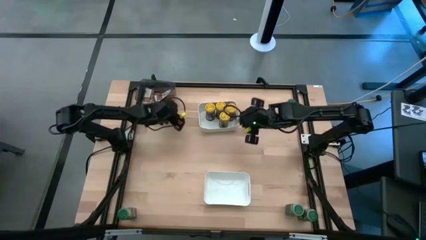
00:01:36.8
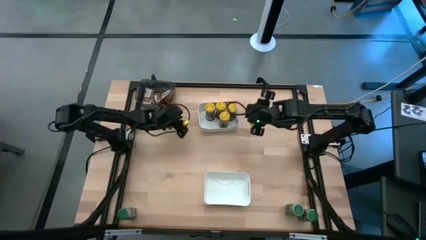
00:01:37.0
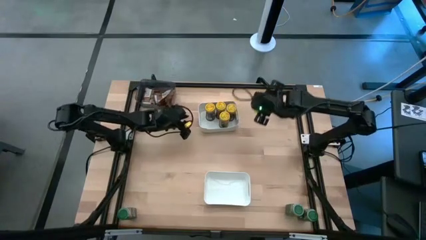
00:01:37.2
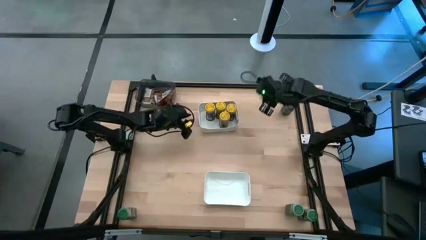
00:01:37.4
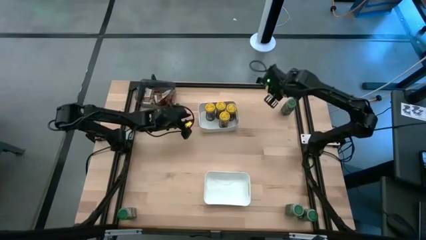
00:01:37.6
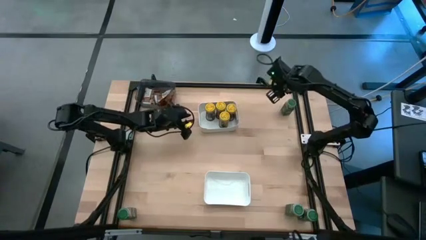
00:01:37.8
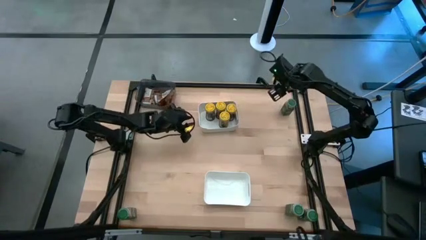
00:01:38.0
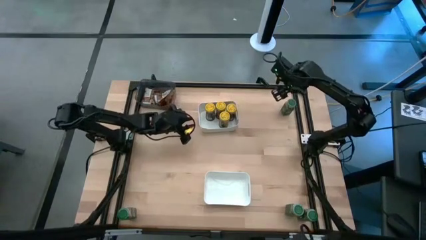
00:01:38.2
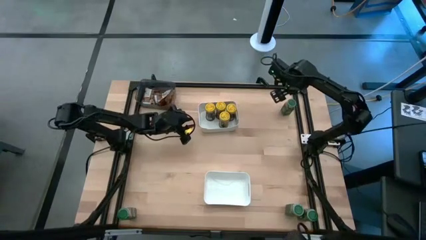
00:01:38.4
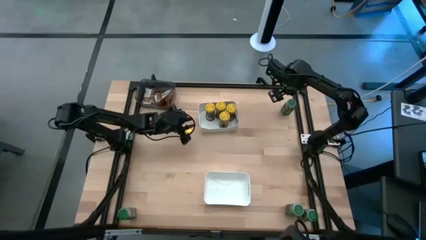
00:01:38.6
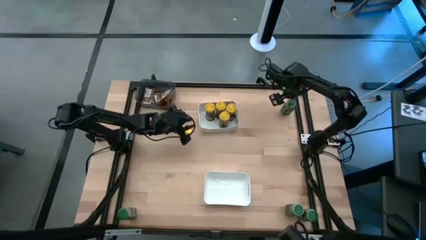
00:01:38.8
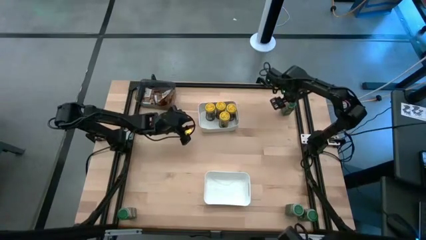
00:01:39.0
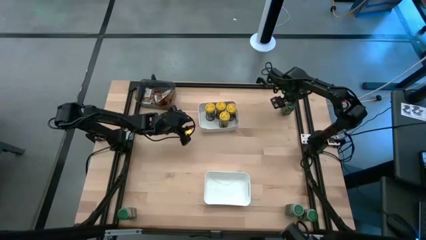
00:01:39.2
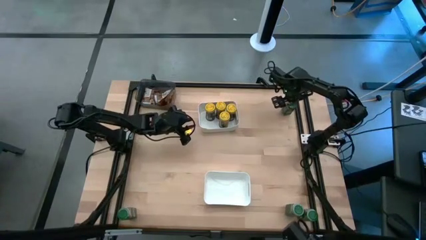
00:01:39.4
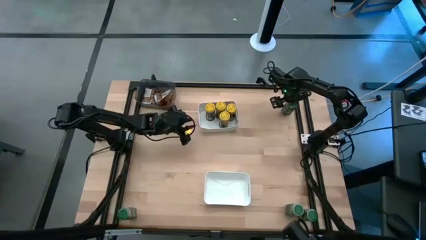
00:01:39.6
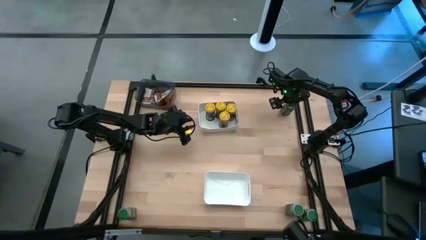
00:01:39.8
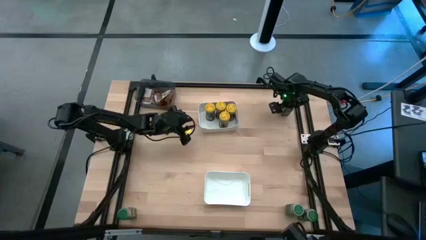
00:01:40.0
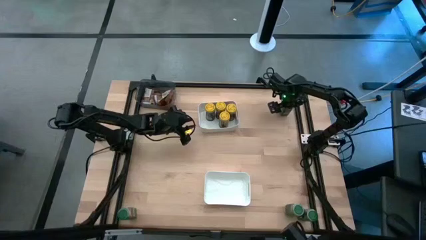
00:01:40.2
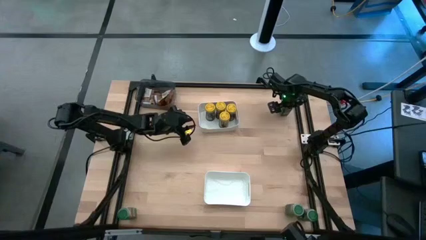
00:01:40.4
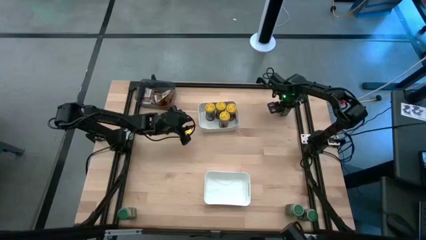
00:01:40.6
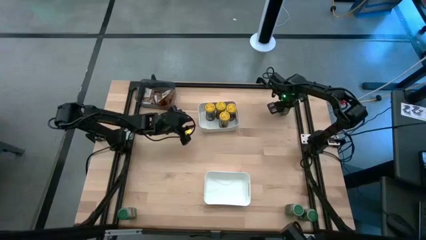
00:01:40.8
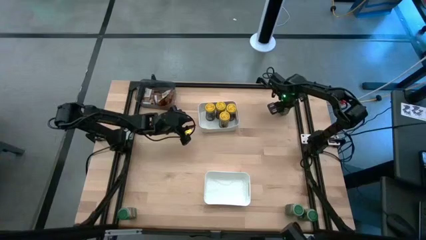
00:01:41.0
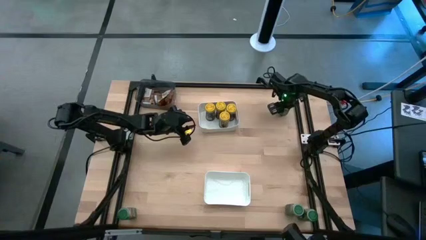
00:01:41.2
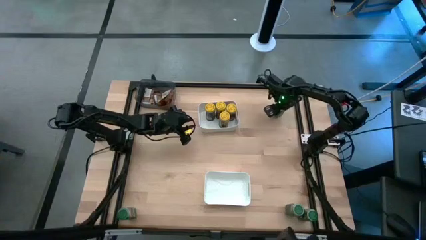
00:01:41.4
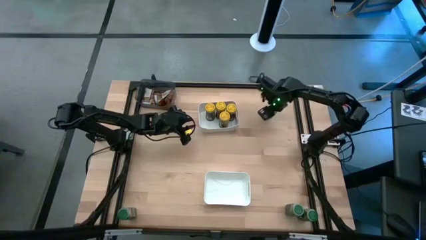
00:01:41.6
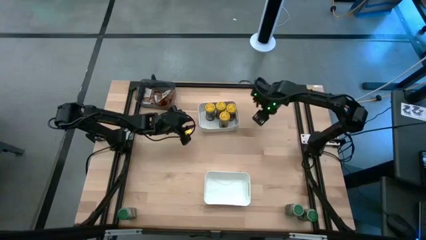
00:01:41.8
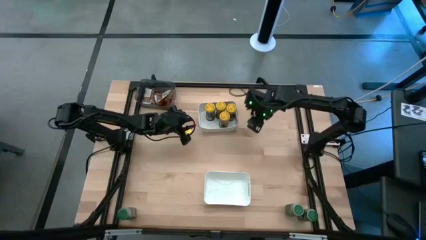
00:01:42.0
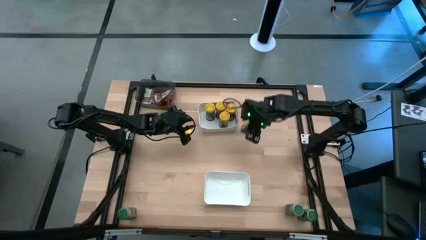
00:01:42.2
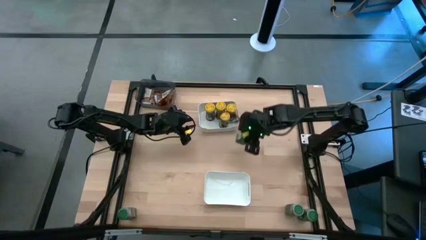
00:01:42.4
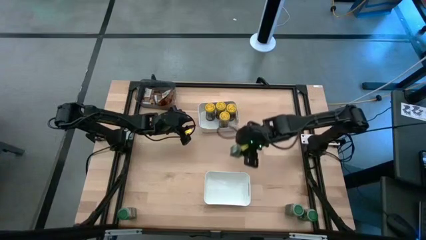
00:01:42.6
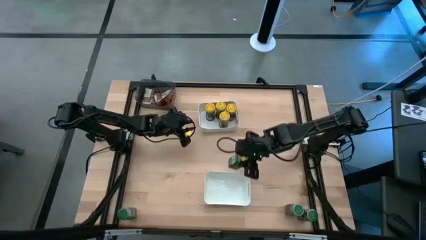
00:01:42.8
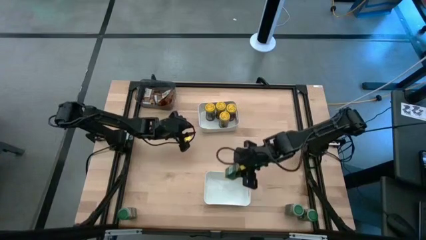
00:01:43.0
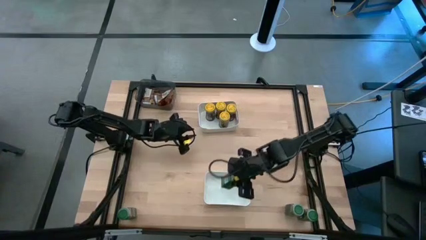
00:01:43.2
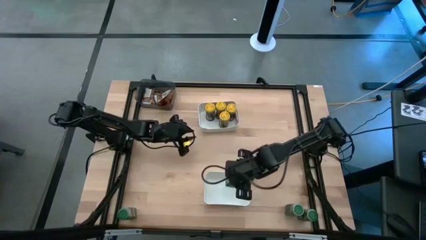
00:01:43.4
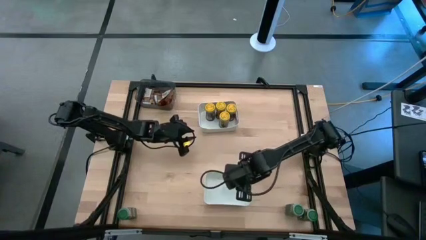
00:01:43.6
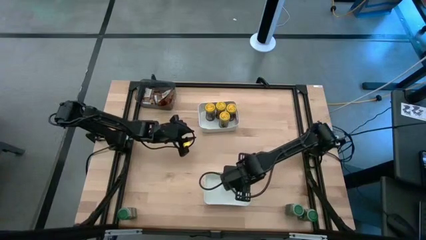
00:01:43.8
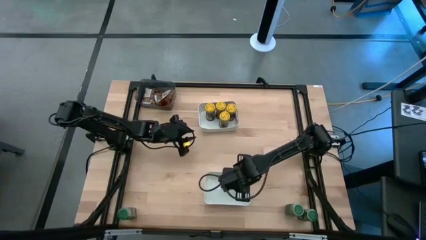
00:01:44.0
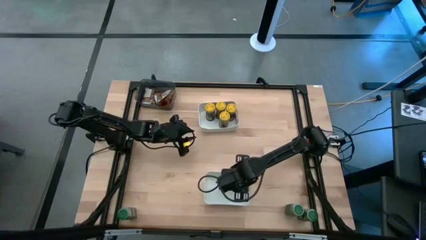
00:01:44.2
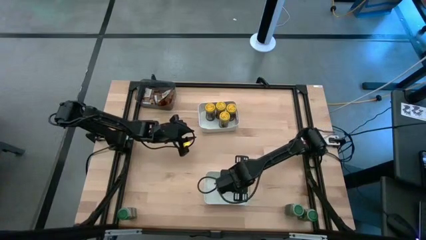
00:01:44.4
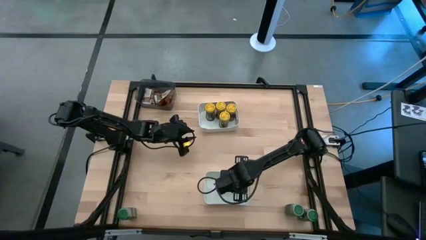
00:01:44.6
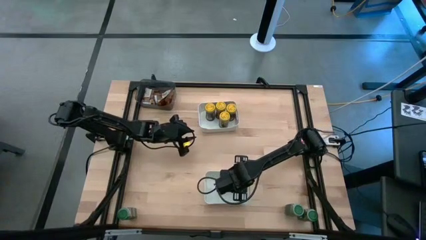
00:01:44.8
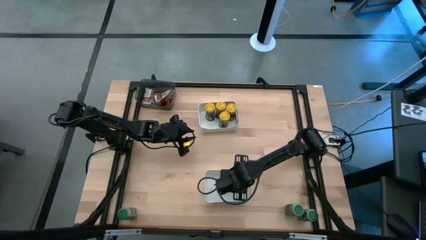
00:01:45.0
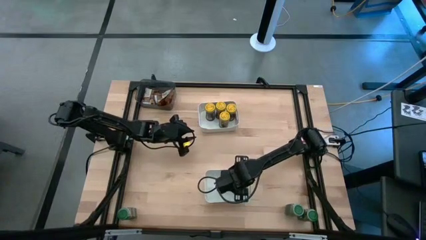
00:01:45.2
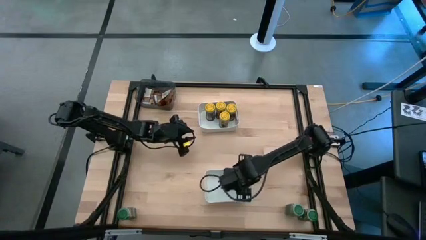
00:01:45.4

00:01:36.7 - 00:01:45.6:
Task: Sort spices by type
Put the green seasoning bottle into the bottom white bin

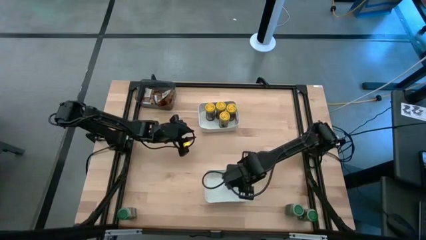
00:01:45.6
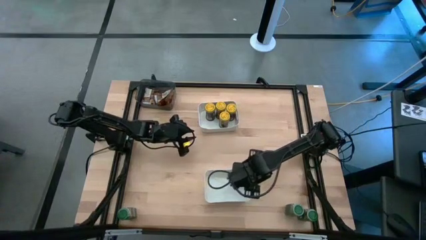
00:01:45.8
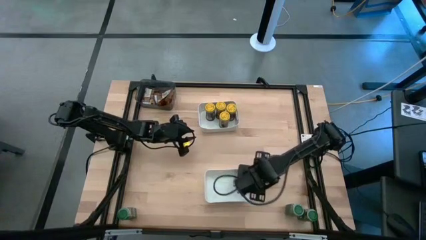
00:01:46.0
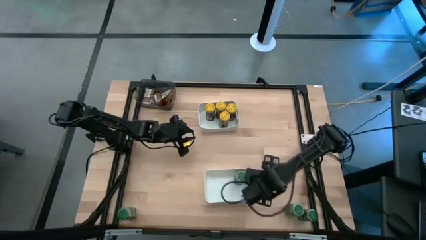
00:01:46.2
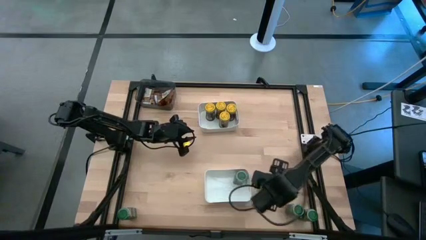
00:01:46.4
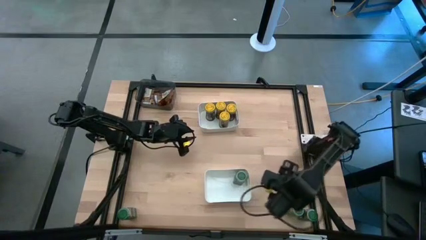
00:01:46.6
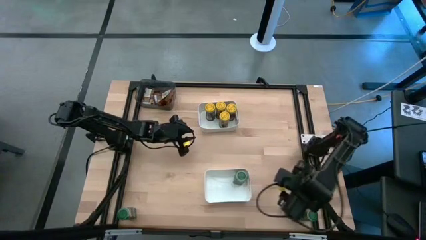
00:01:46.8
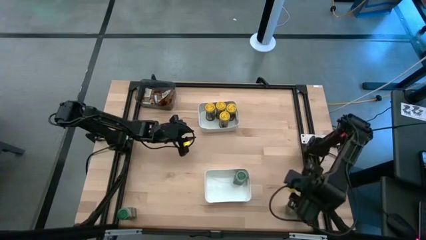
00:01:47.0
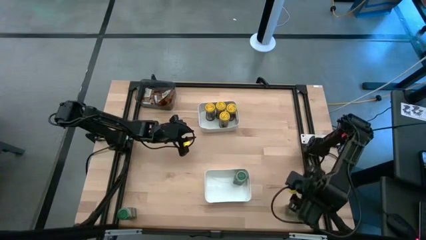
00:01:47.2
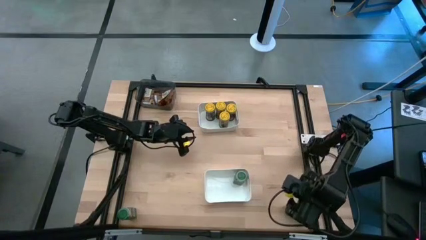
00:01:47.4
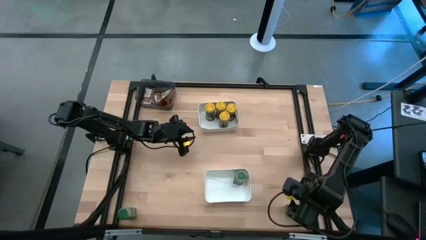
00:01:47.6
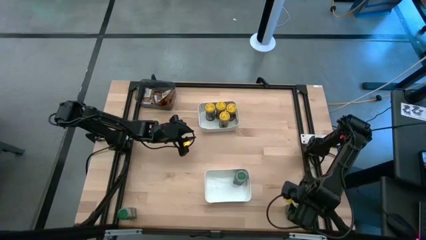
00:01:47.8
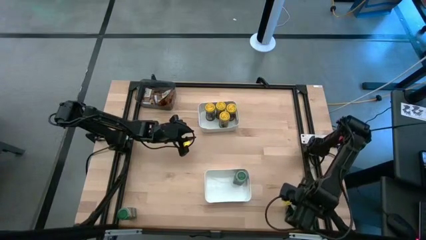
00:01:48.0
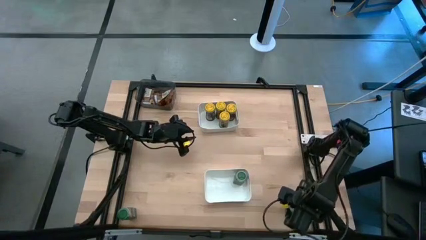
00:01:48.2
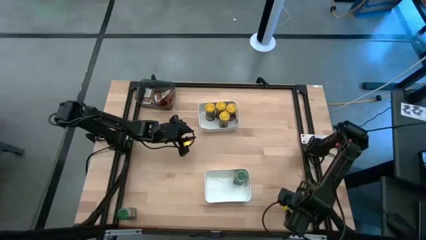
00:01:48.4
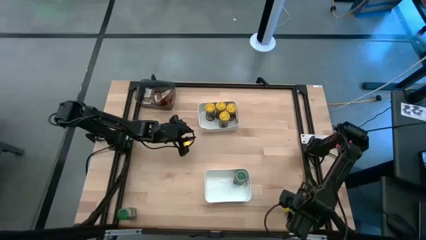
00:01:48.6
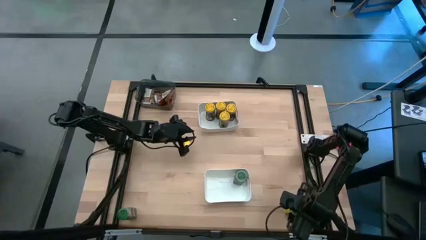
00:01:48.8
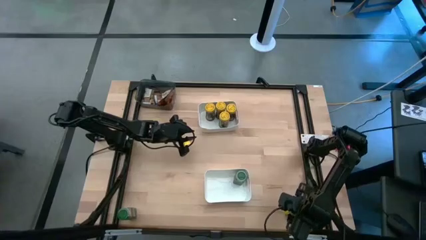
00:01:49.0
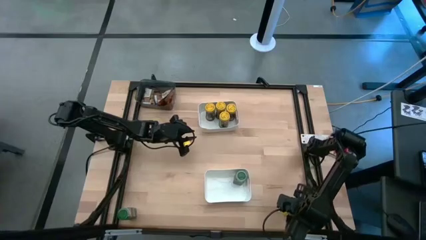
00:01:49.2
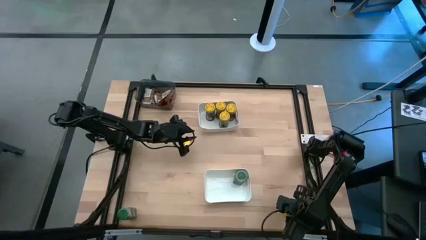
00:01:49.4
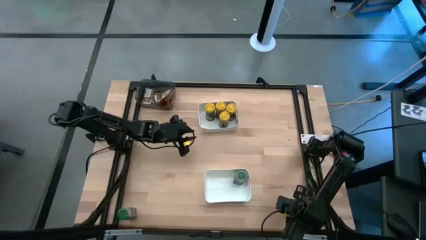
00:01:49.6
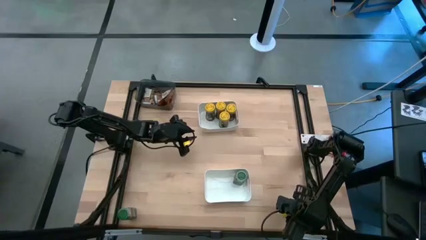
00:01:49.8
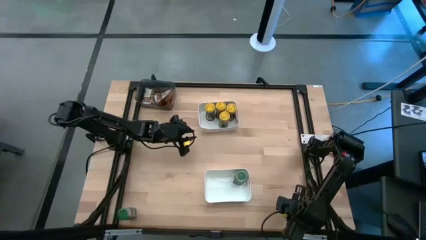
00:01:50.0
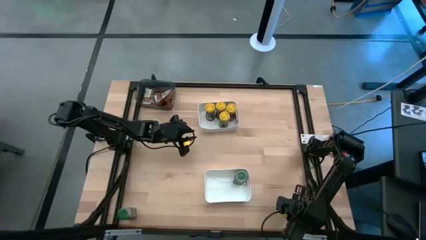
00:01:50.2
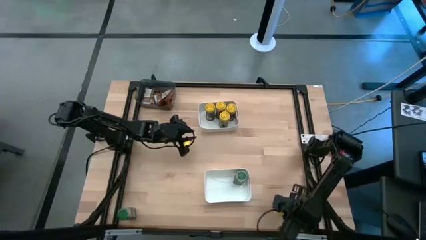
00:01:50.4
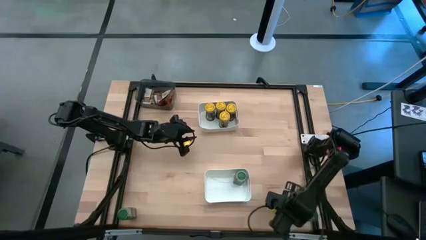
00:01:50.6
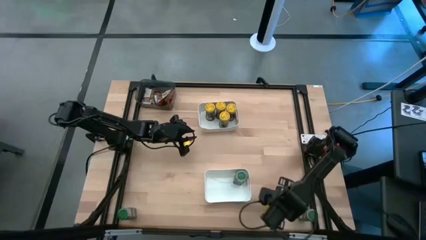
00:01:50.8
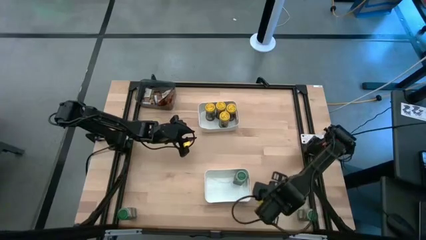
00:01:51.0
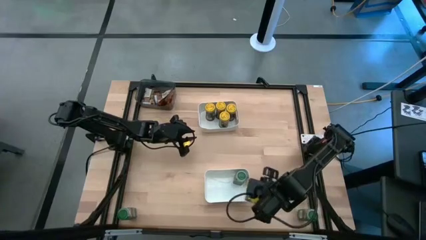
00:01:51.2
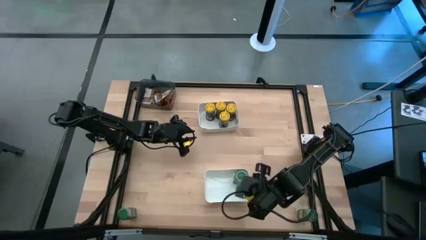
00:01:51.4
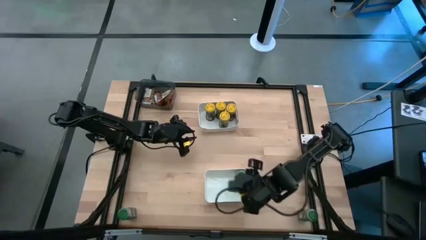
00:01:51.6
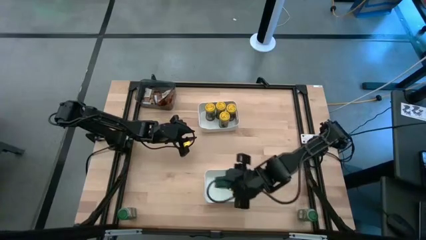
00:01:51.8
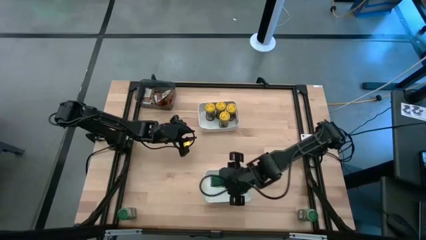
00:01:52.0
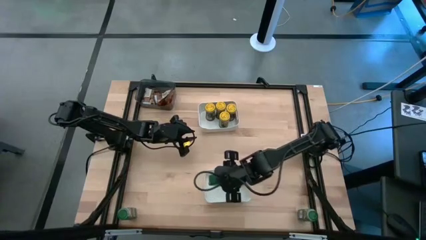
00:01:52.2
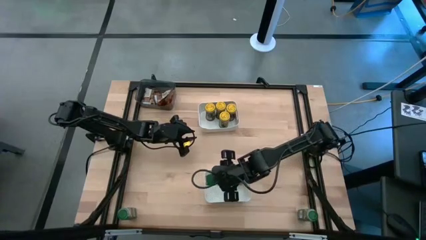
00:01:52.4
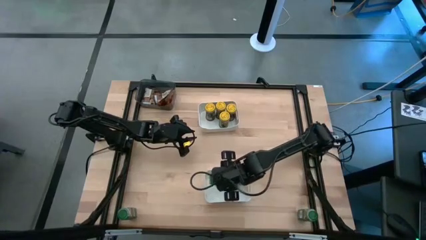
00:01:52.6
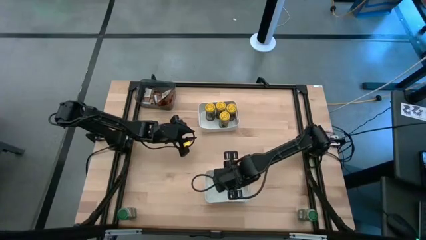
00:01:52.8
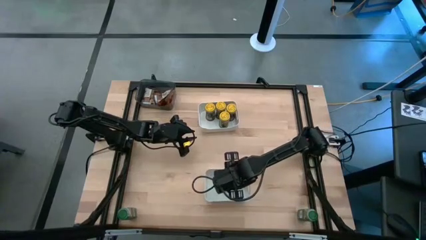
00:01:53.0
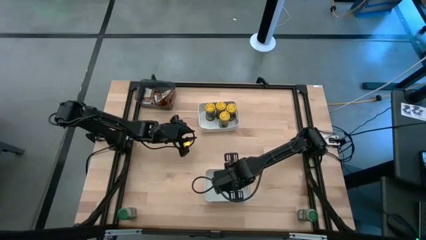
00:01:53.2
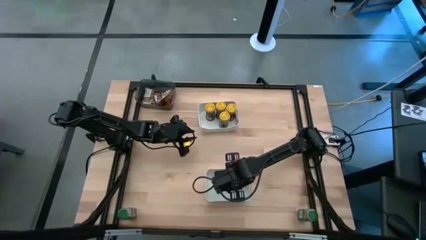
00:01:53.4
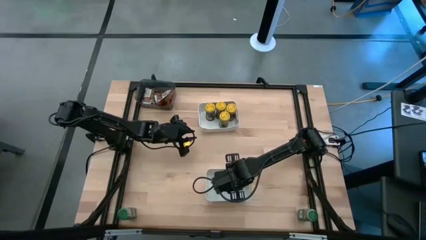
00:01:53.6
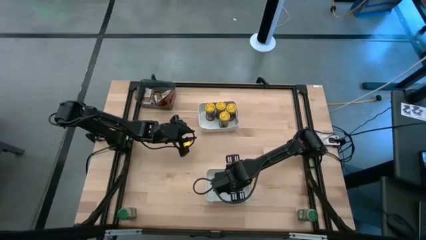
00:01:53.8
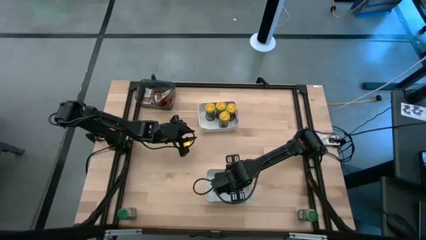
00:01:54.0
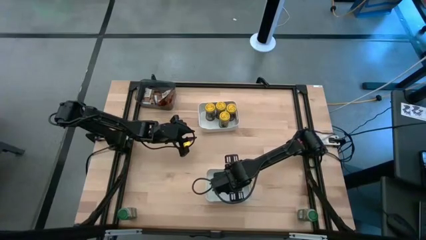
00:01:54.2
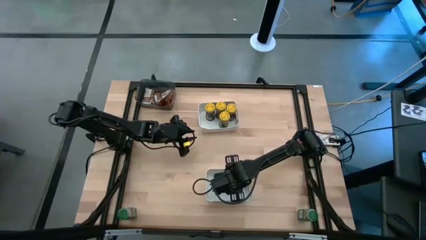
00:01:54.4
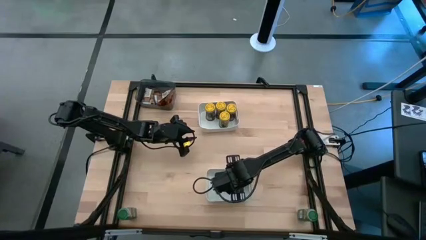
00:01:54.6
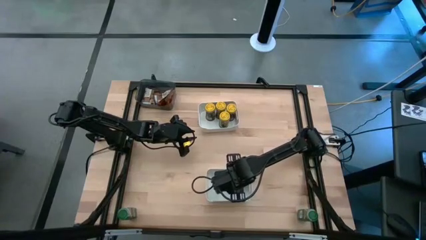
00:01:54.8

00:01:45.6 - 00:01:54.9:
Put the seasoning bottle into the bottom white bin
